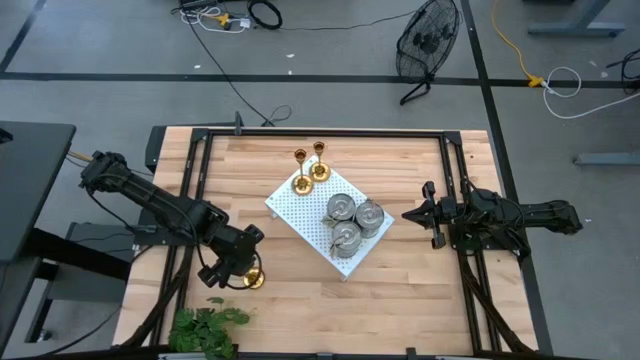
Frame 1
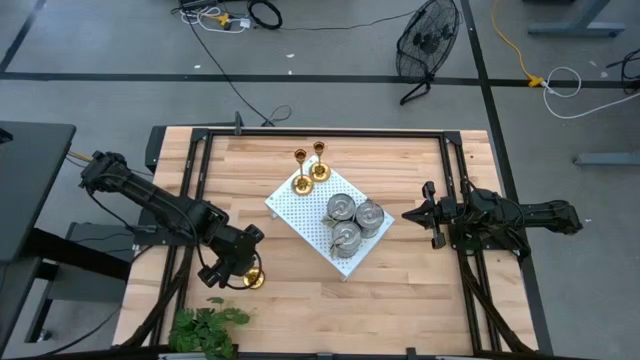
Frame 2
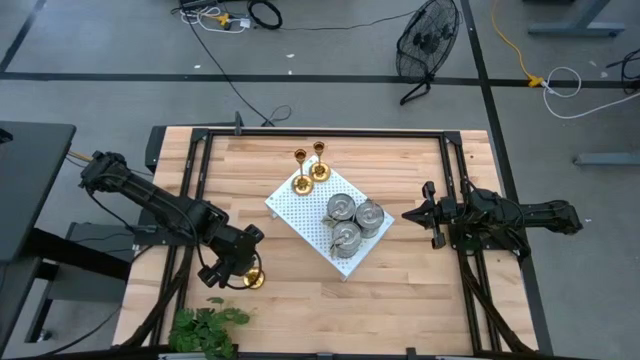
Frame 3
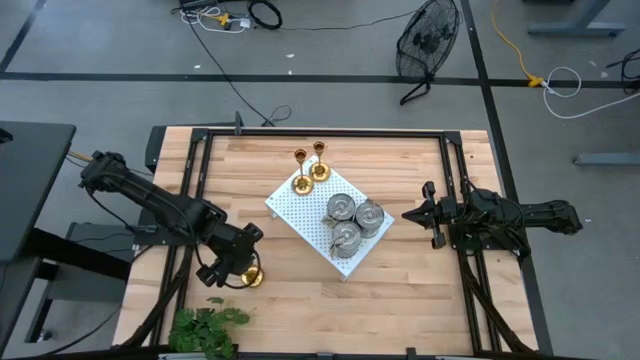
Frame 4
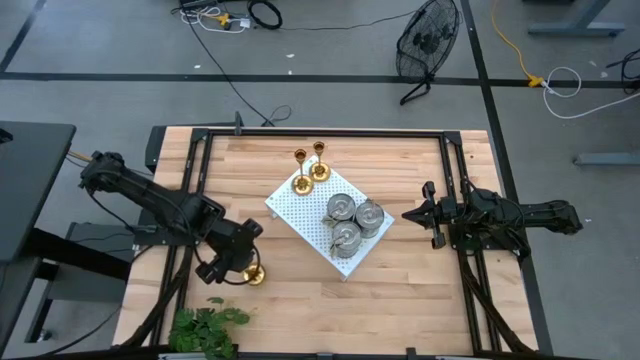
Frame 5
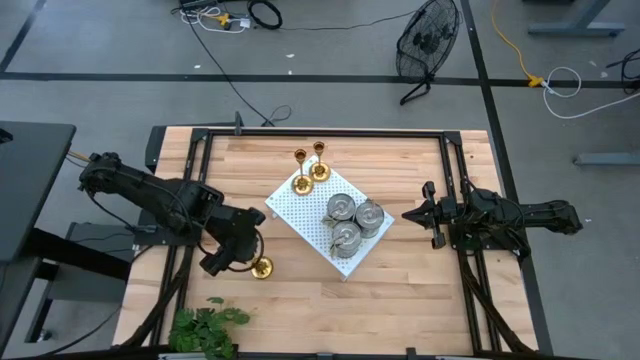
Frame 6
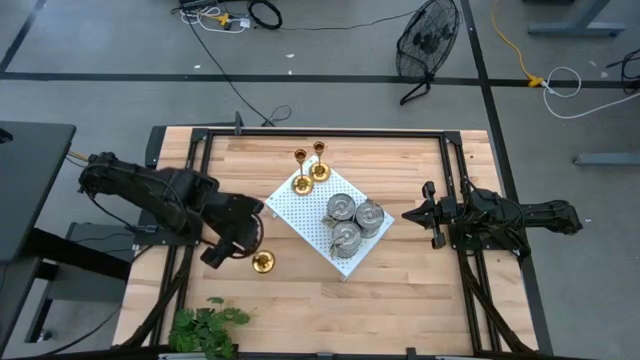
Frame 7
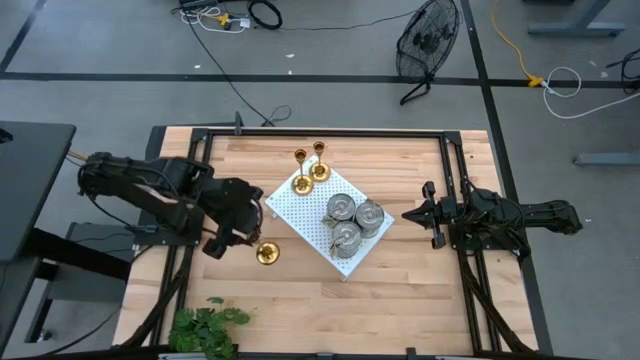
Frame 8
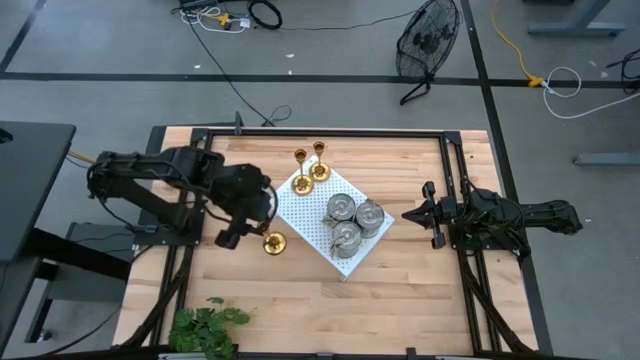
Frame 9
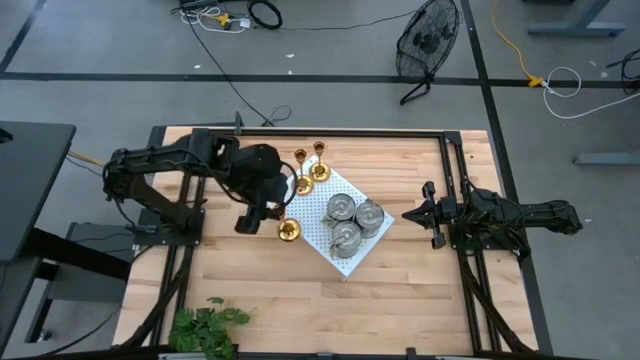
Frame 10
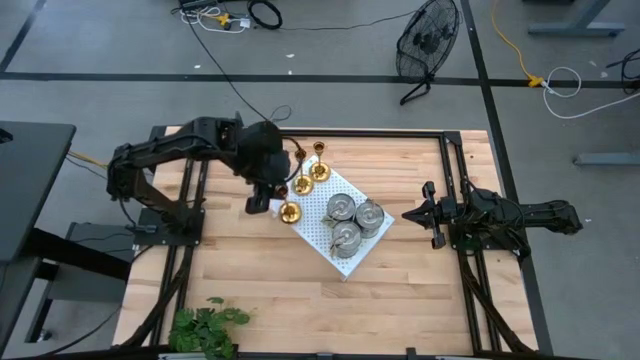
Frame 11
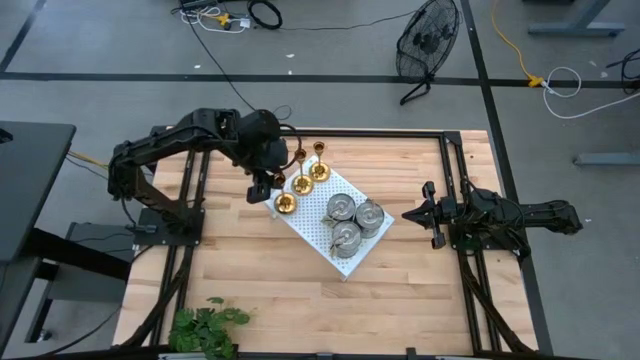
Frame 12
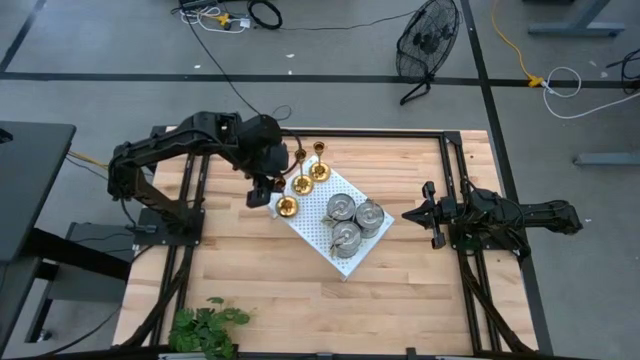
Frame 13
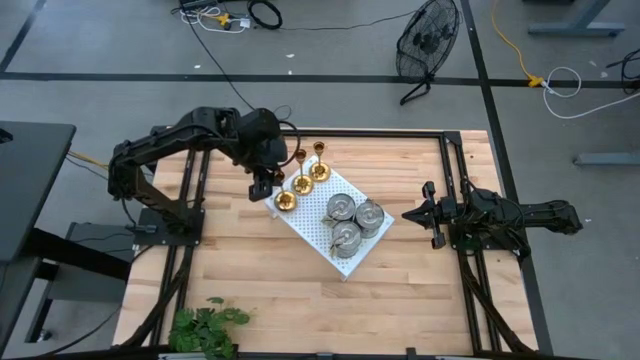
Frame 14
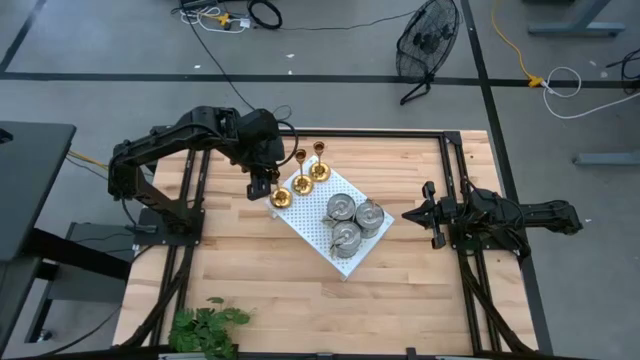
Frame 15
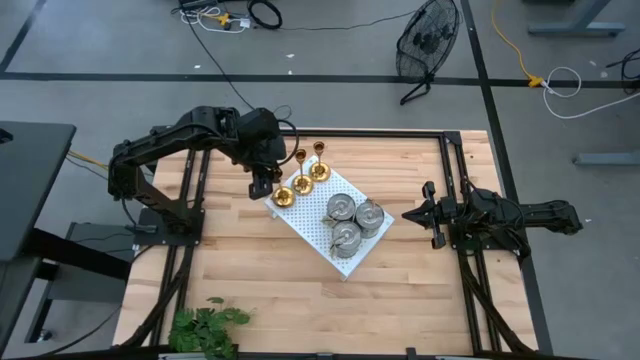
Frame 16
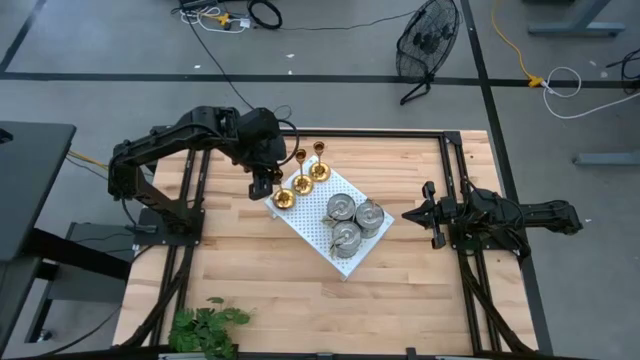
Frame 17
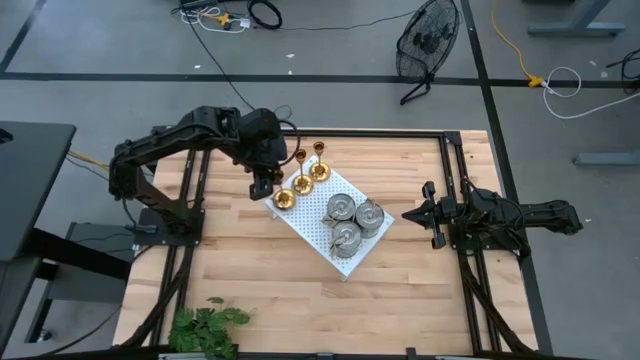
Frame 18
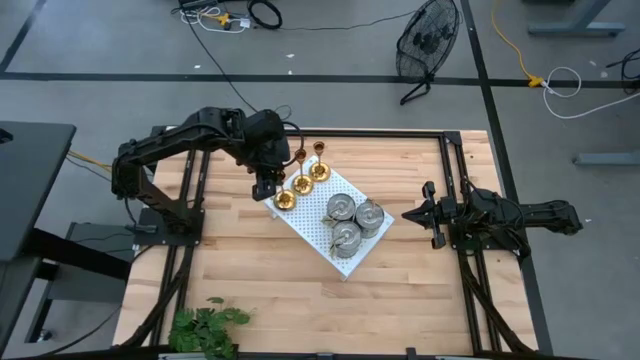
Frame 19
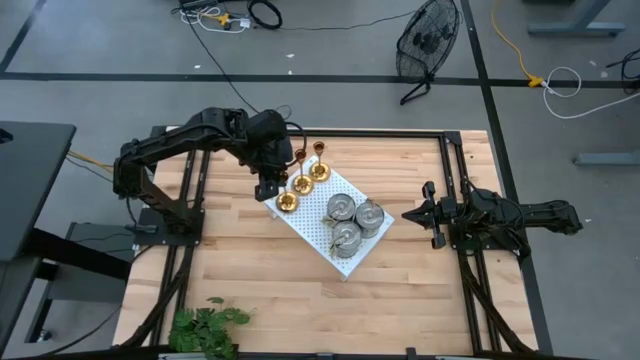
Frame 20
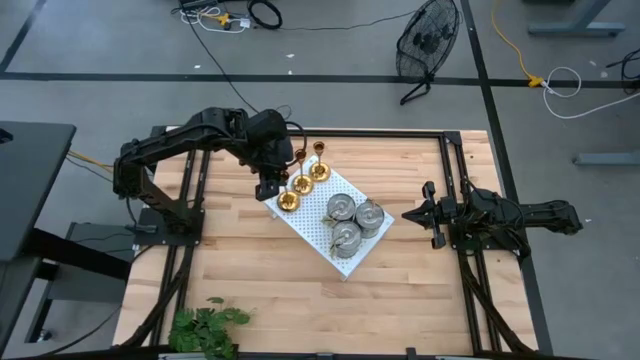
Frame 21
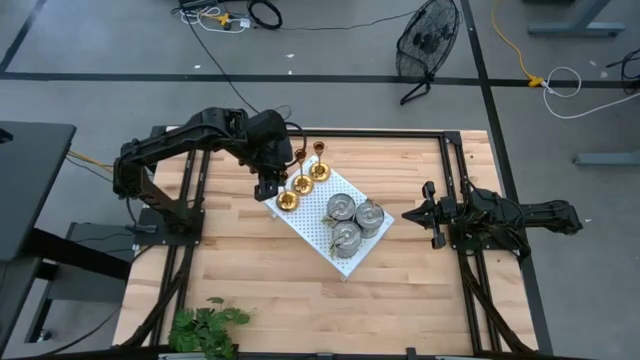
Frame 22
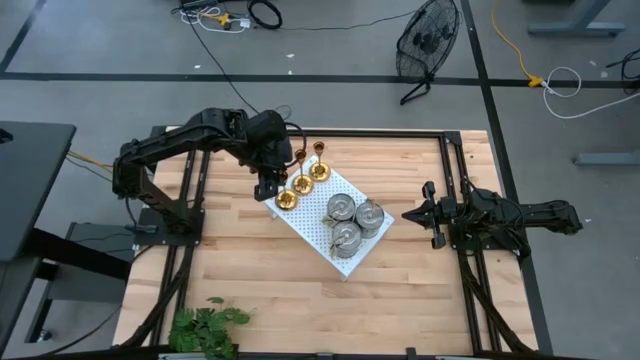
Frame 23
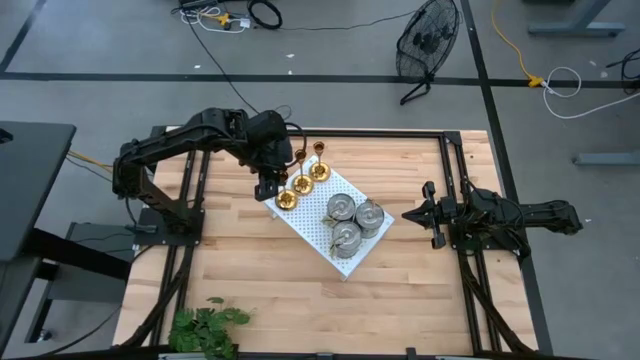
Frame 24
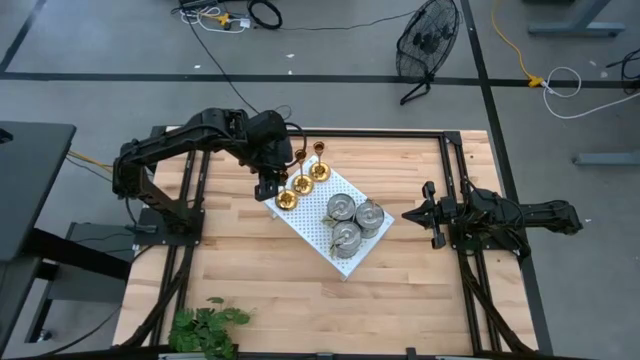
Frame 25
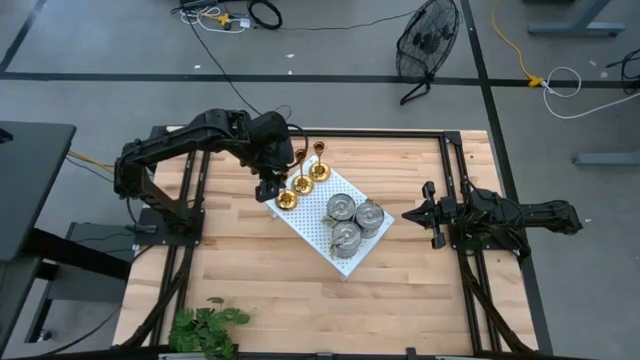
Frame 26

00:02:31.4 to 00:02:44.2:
Task: Pick & Place candle stick holders
Put the gold candle holder on the shelf align with the other gold metal candle holder

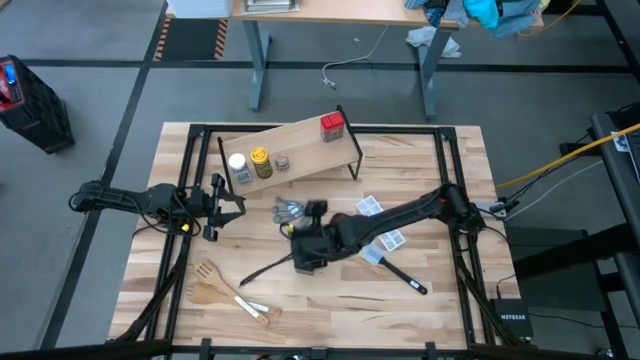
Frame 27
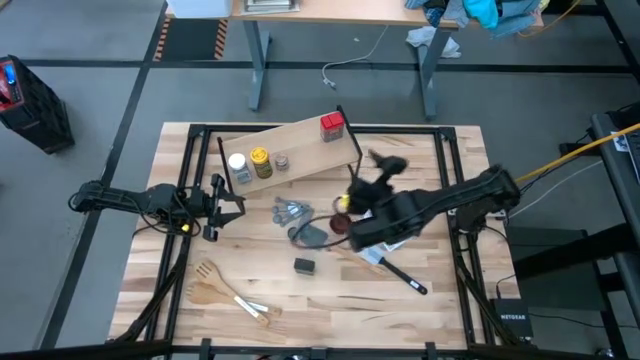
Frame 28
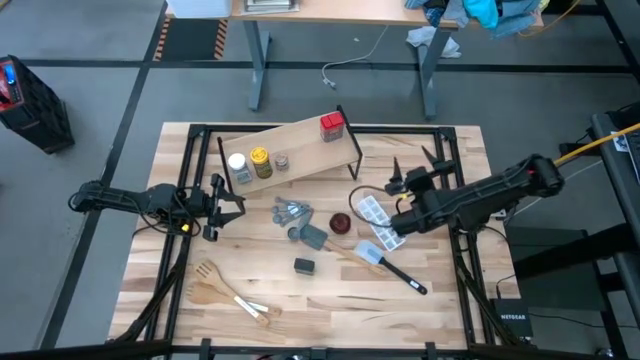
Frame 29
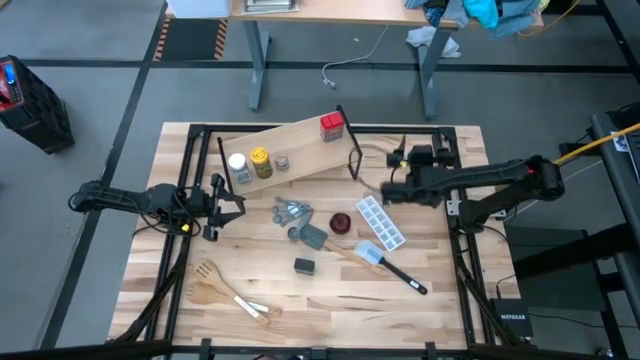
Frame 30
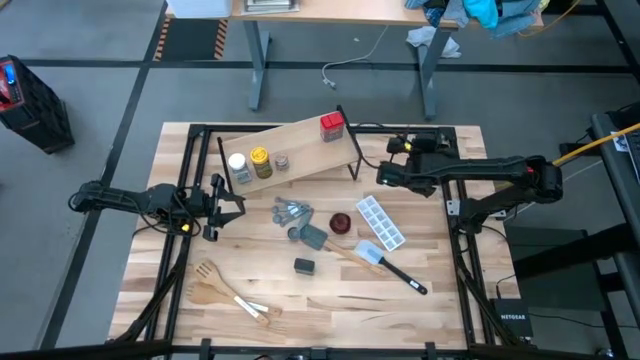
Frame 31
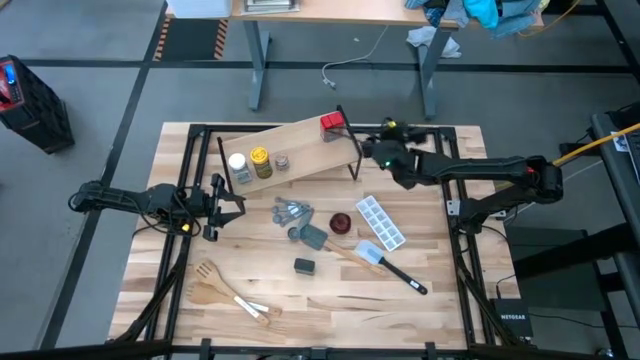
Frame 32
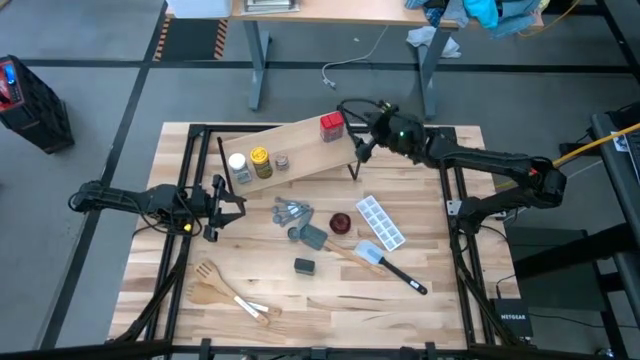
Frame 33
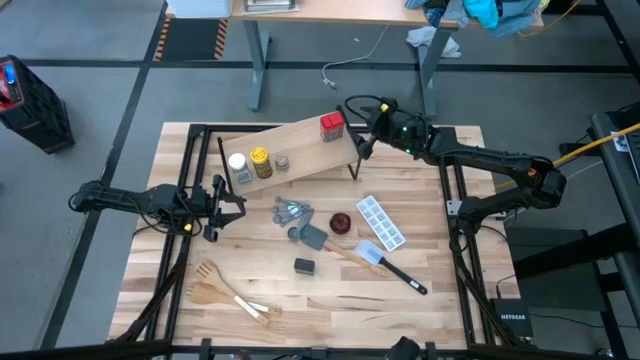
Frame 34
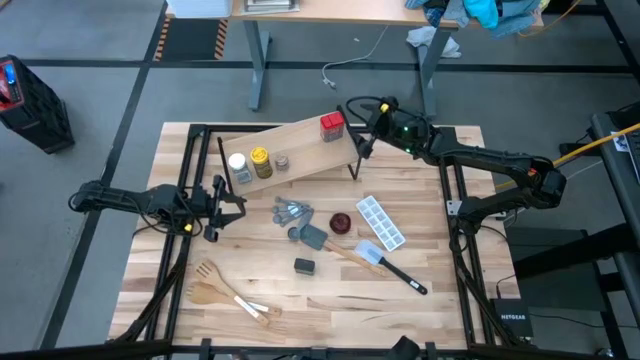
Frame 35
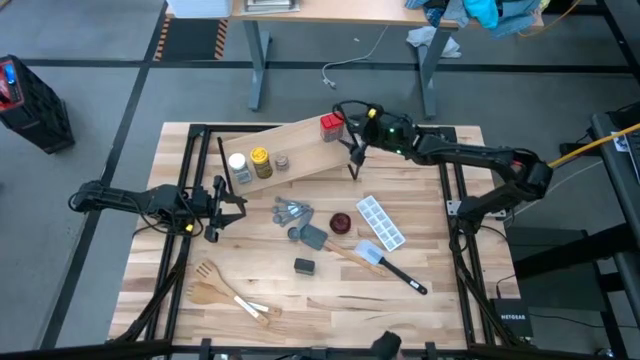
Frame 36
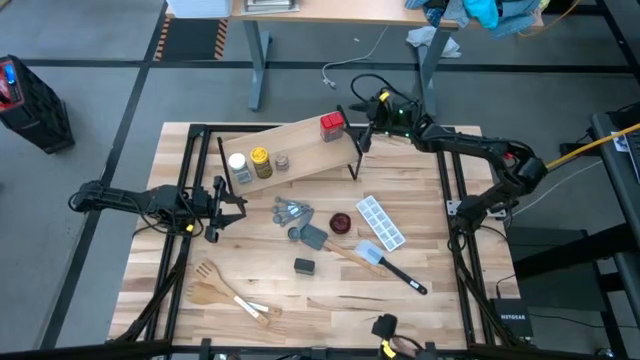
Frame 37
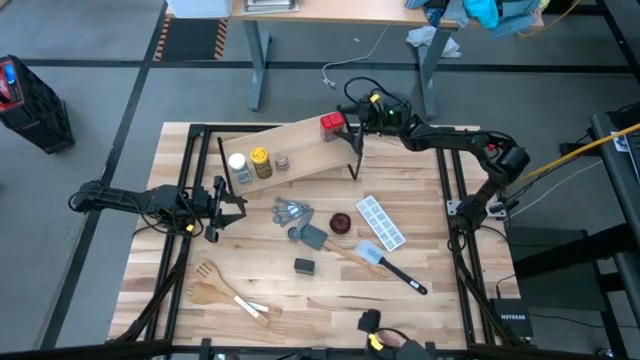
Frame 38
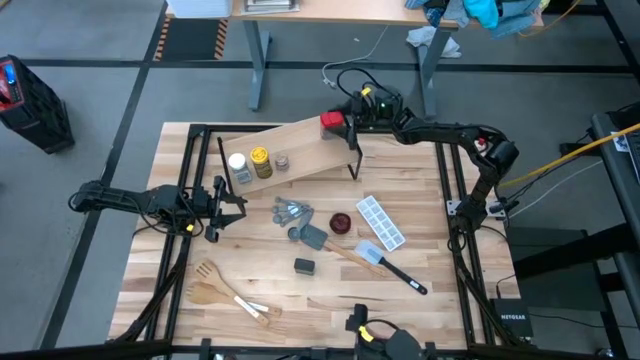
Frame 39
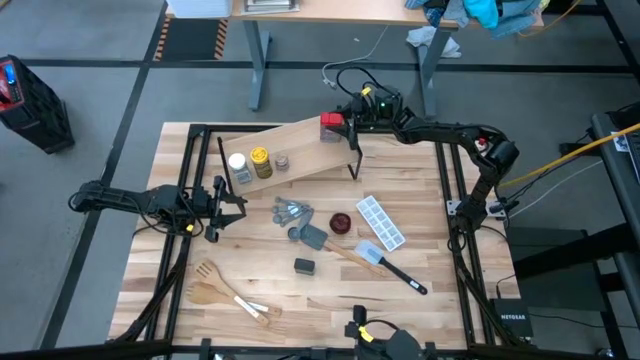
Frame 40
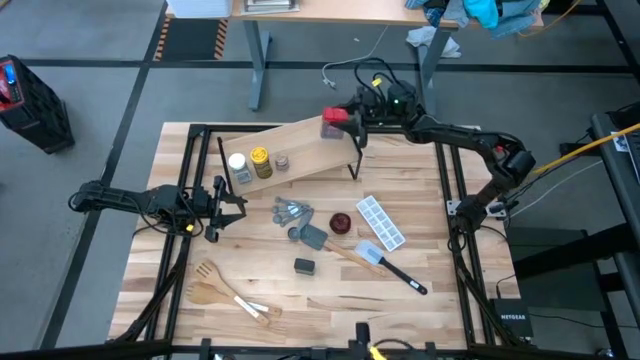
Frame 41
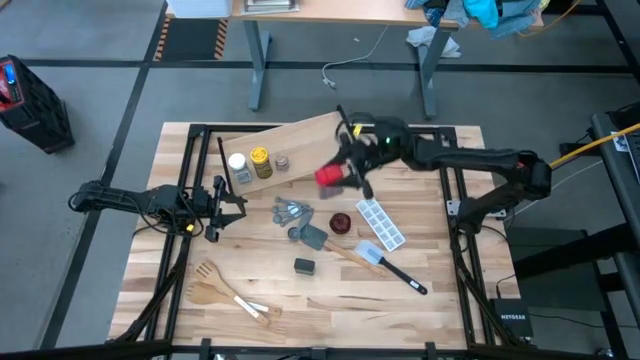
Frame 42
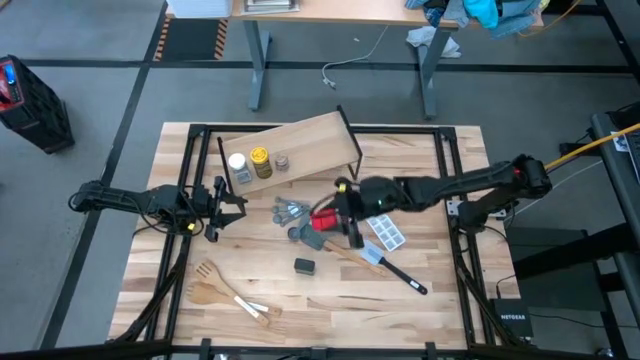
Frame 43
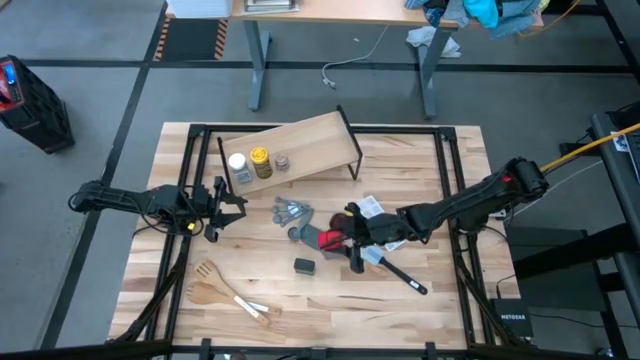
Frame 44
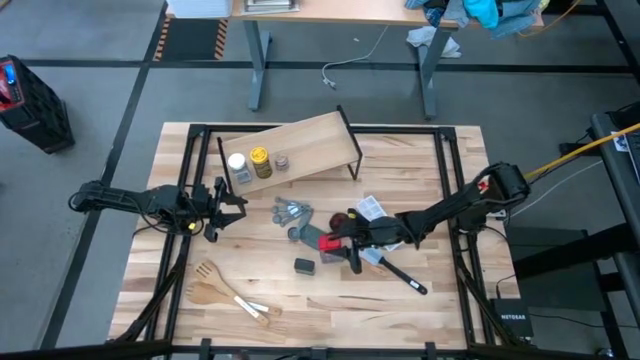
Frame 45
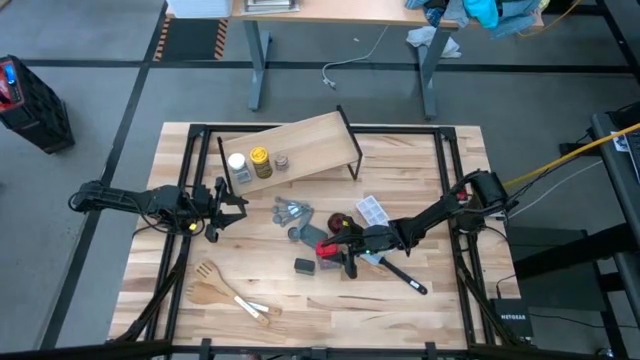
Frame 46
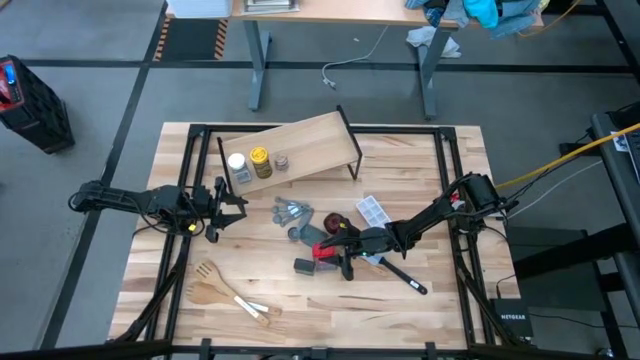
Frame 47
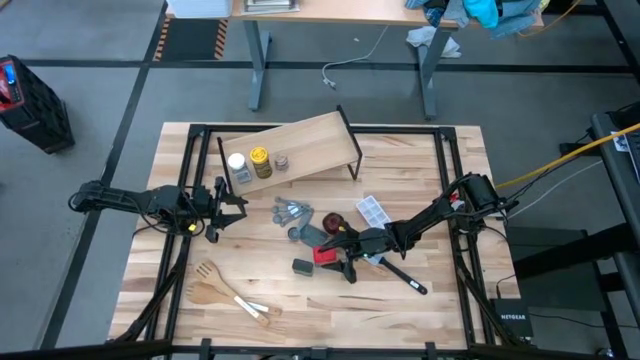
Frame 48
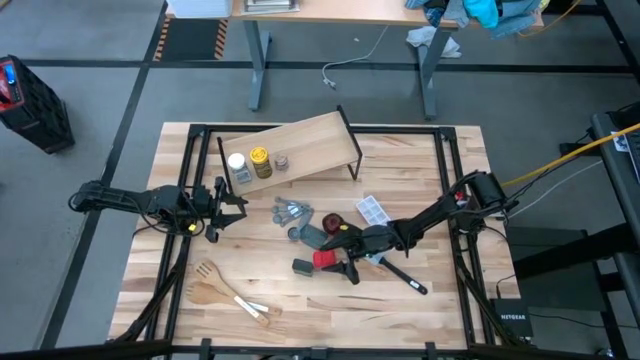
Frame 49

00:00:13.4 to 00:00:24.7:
Task: Shelf spices
Remove the red seasoning can from the shelf
